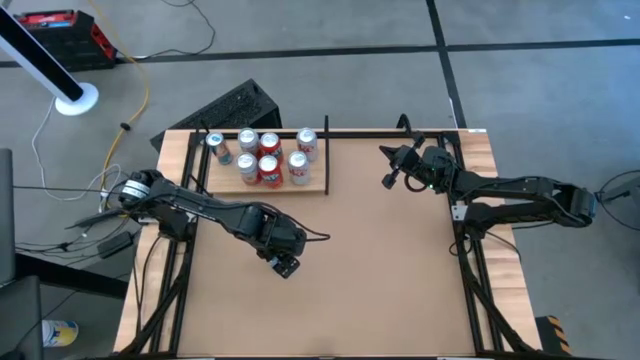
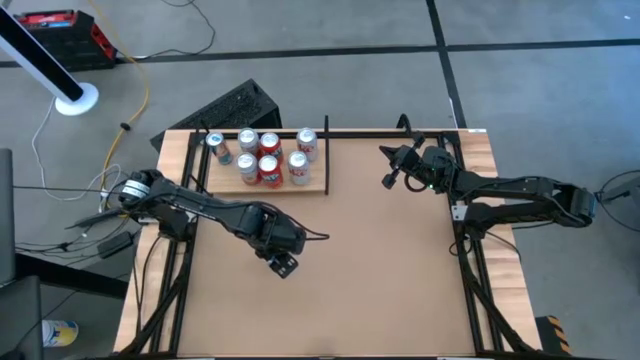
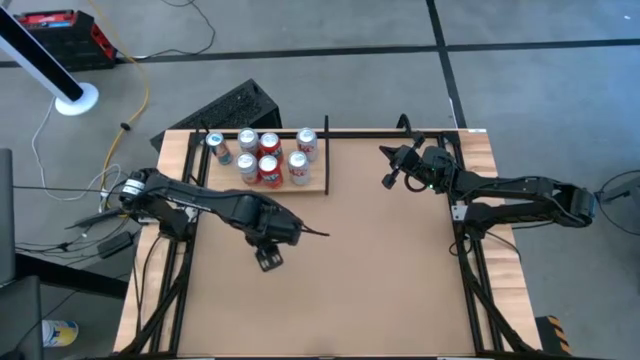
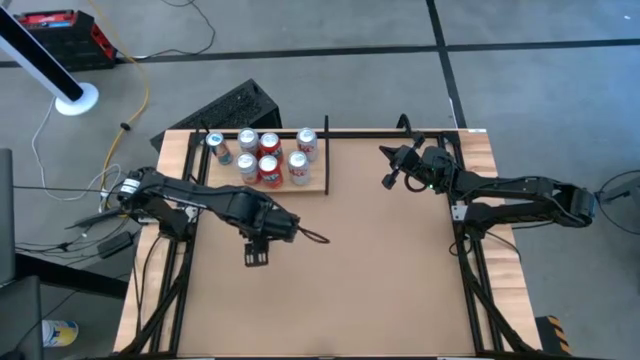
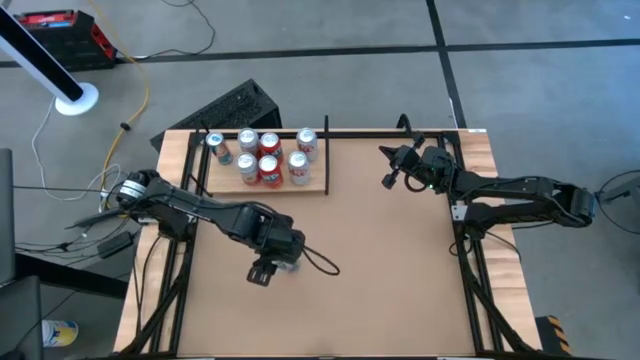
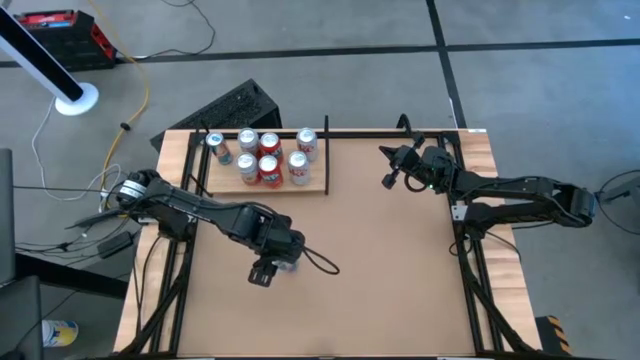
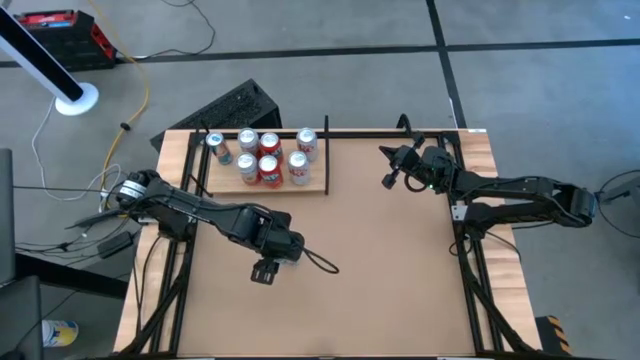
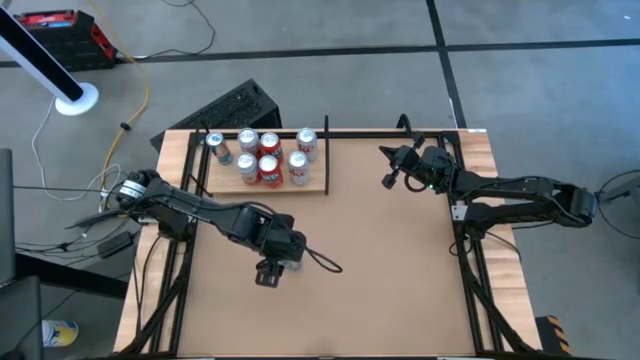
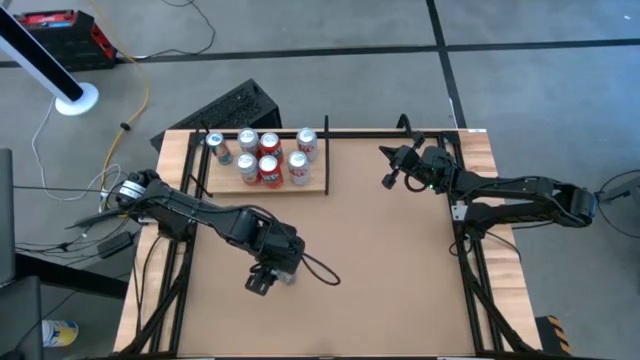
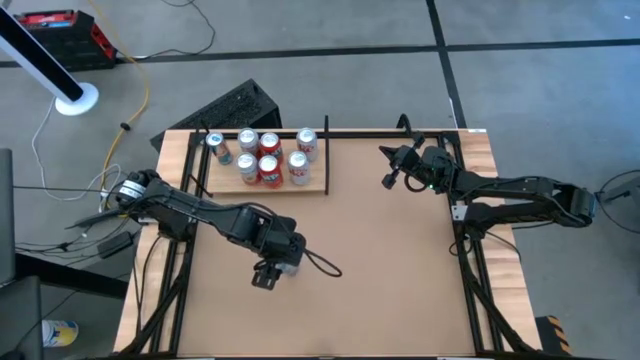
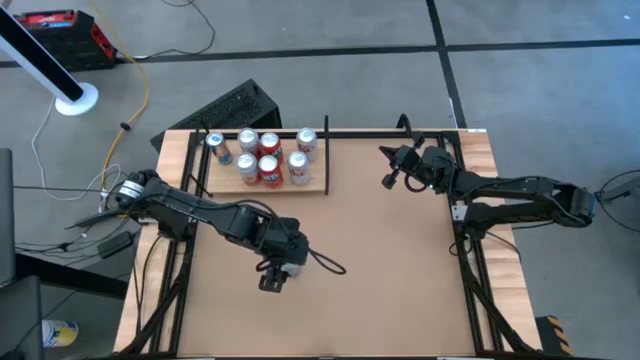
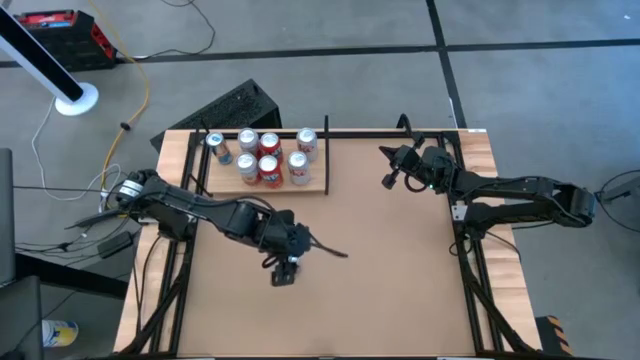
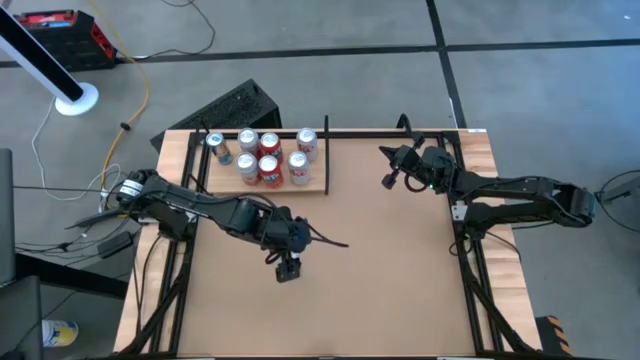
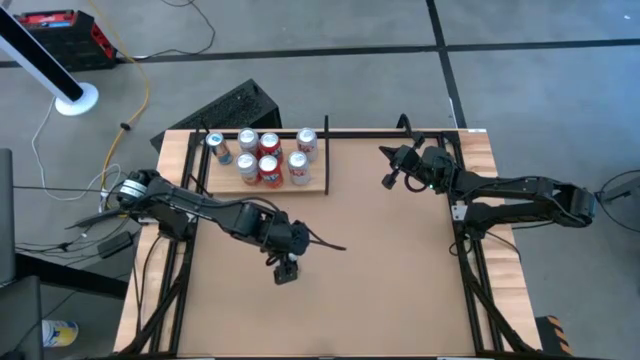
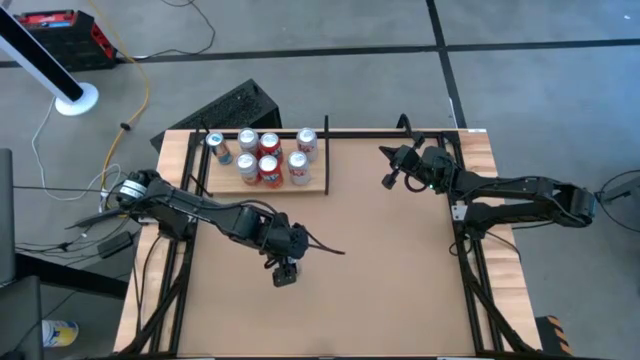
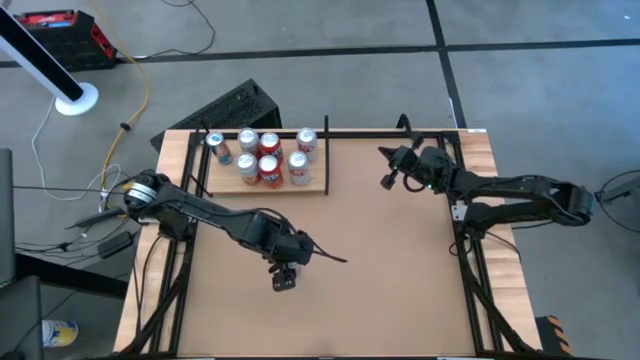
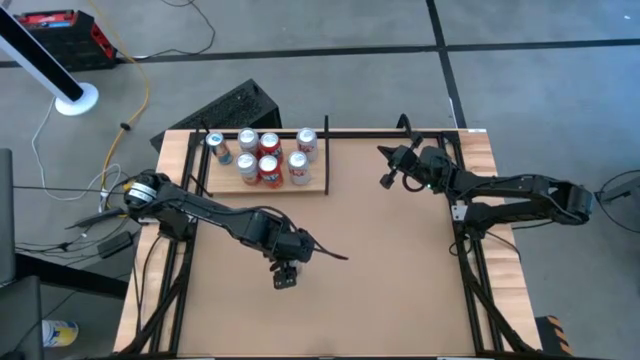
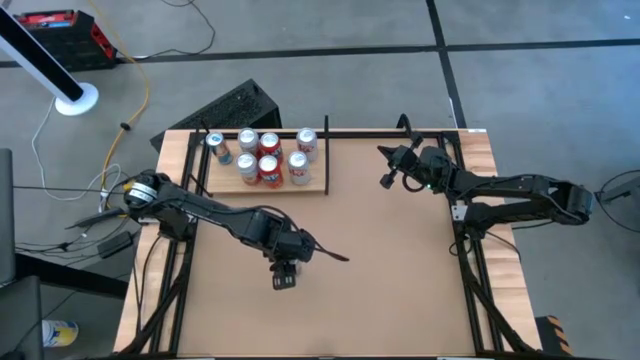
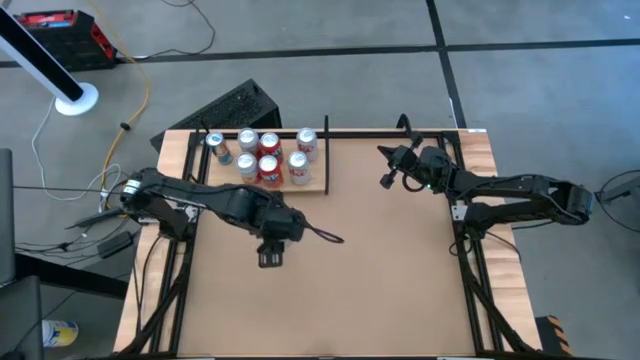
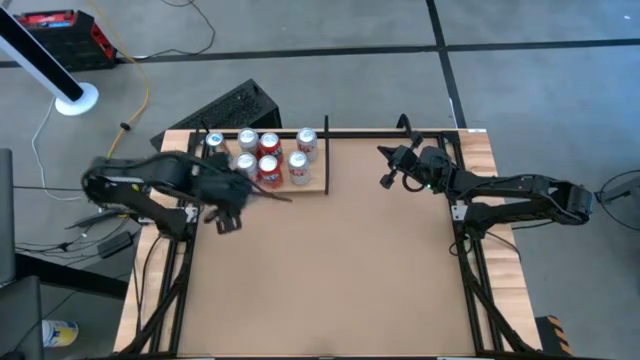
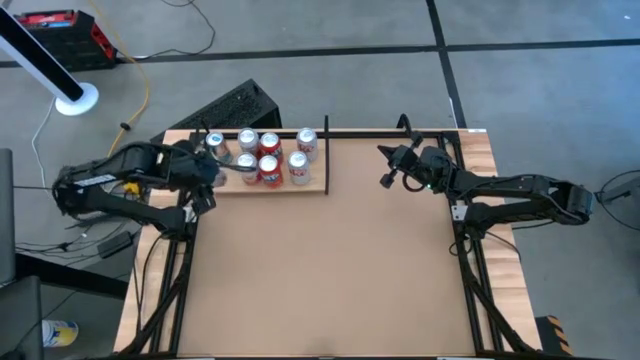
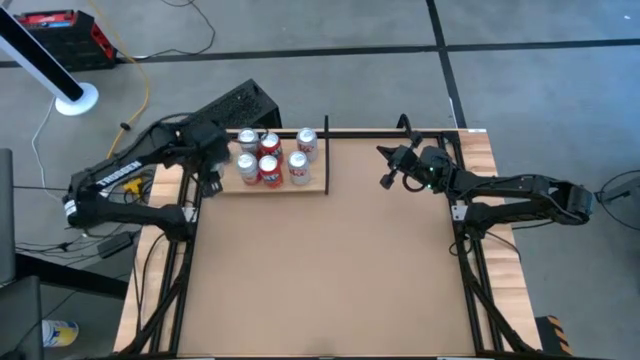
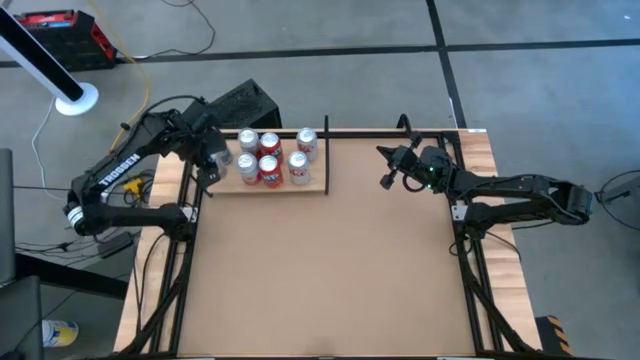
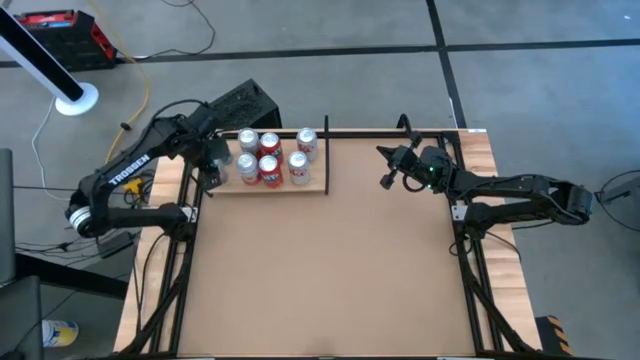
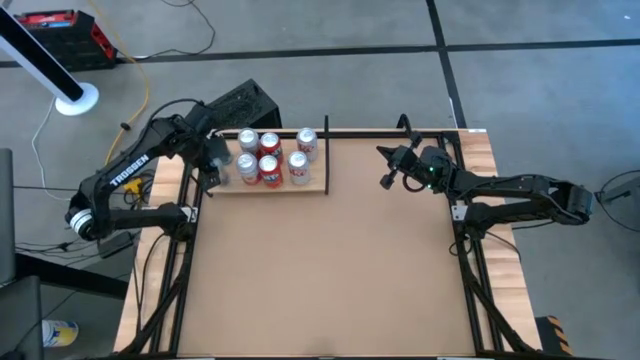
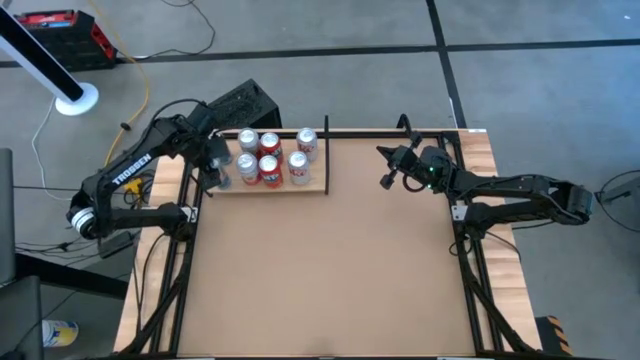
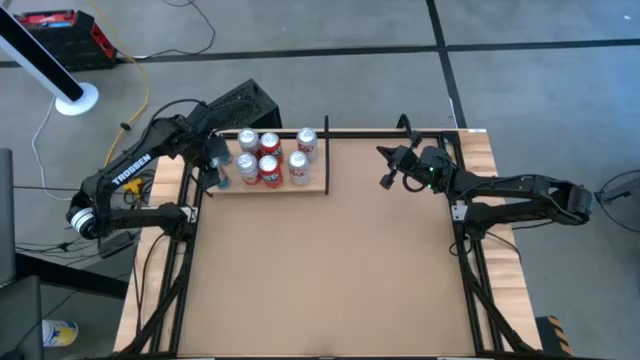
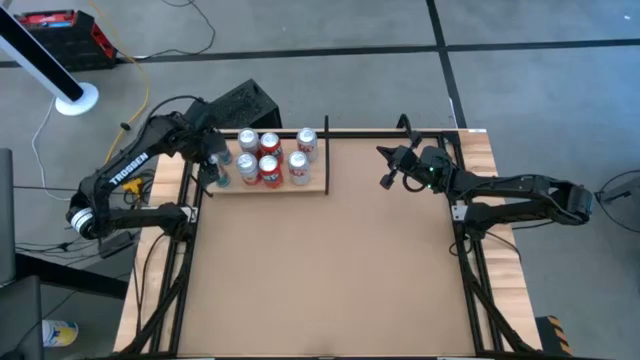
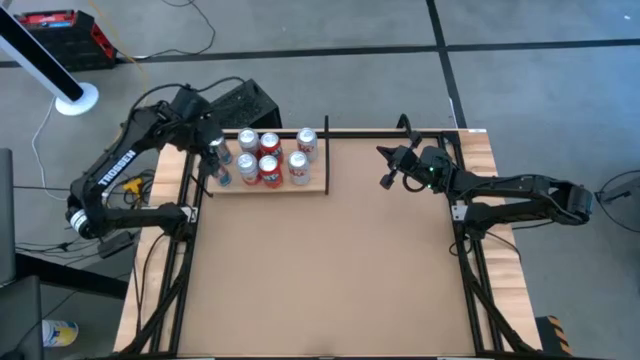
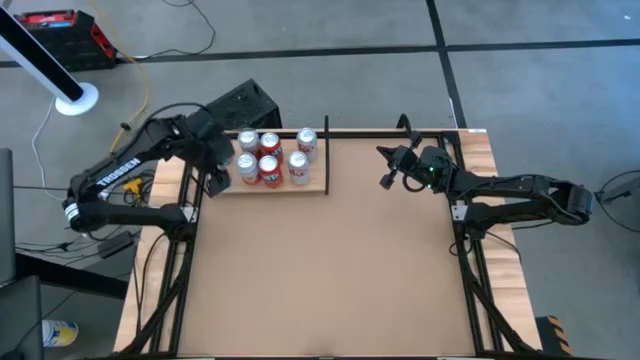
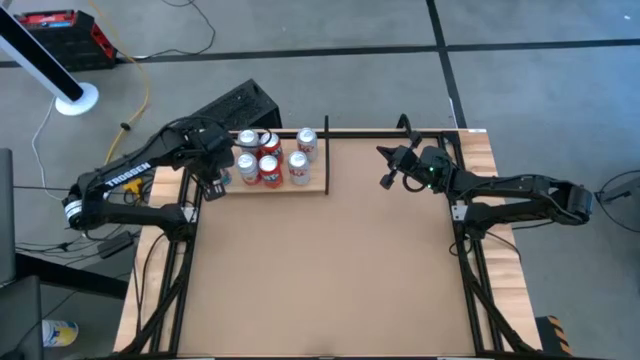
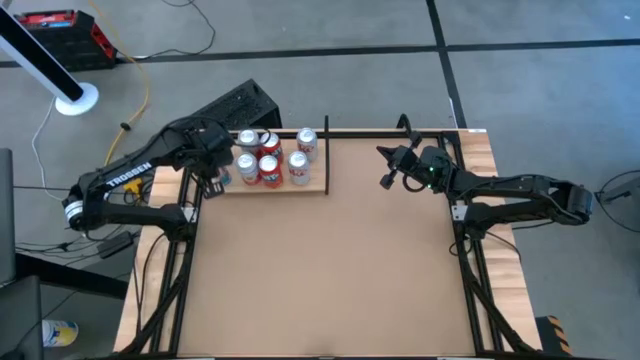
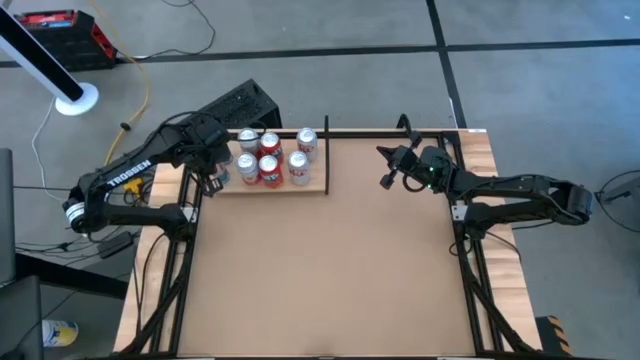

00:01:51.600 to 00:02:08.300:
Task: Place canned beverage on shelf
Put the blue soda can on the shelf aligned with the other blue soda can

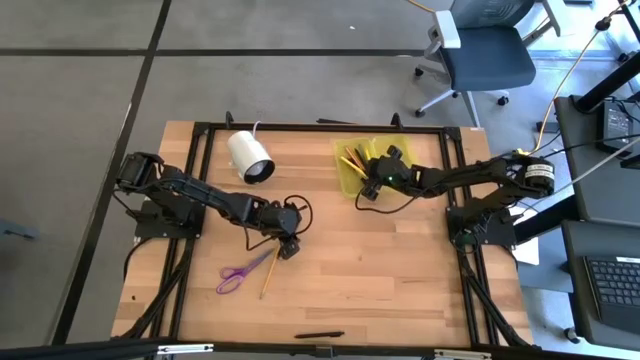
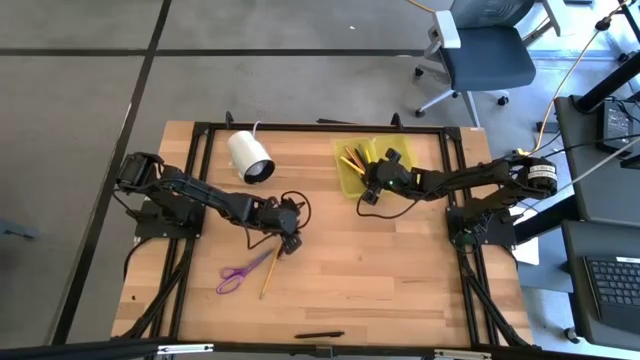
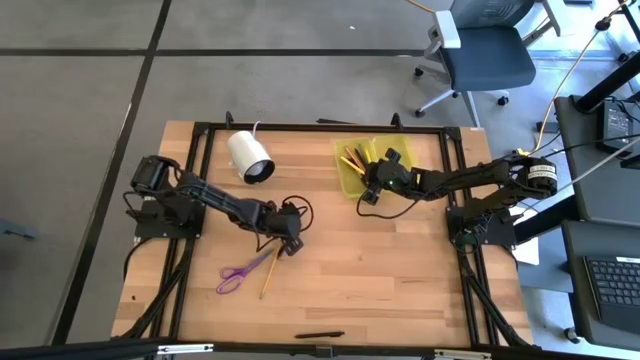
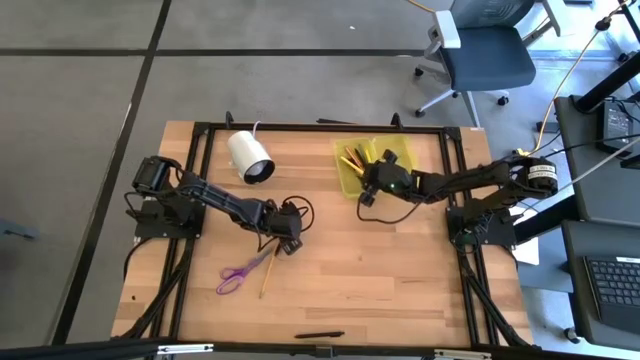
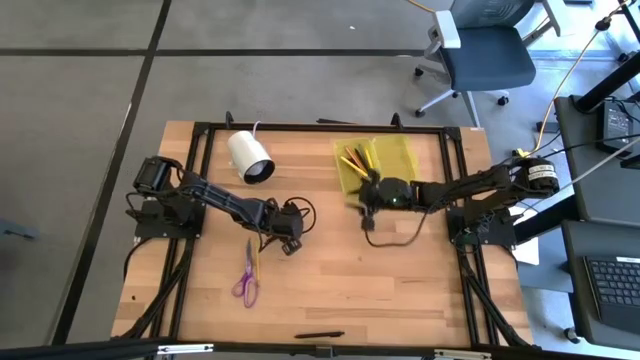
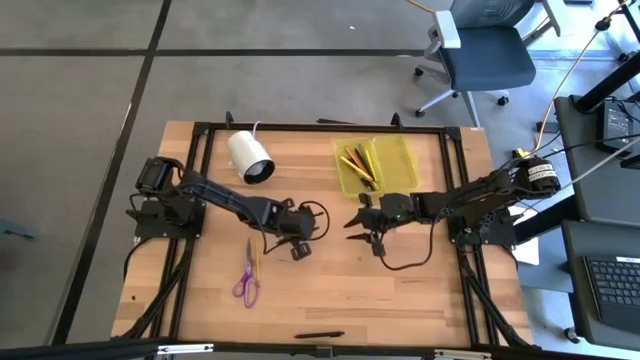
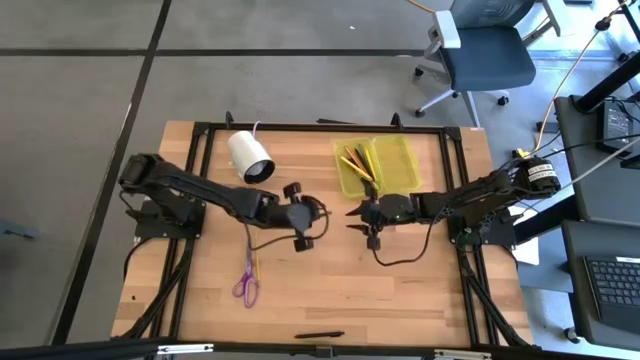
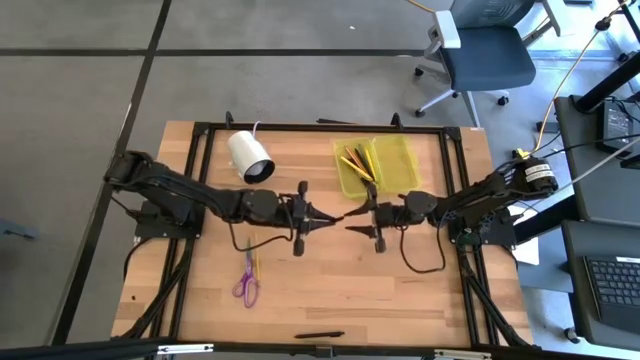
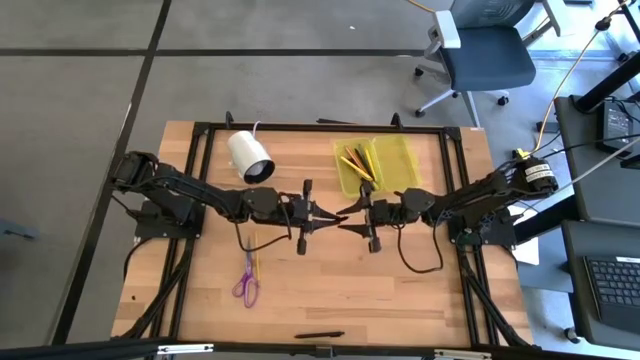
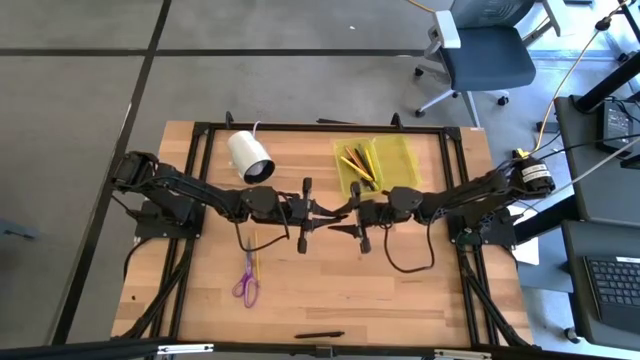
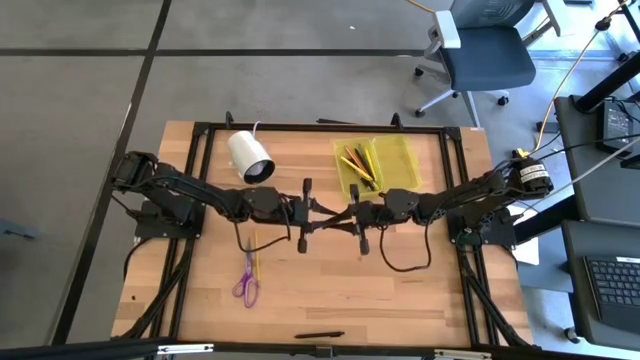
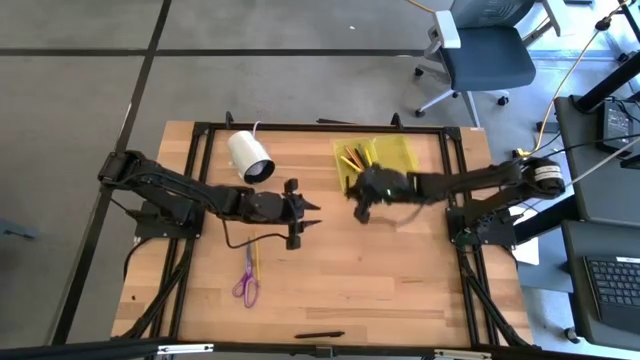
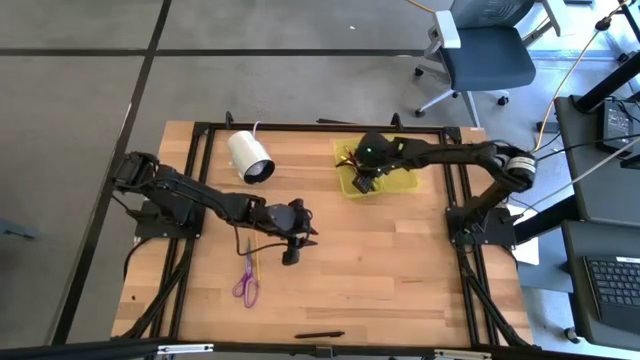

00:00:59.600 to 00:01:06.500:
Task: Pick & place school supplies into a supply box
Put the black pen into the yellow supply box
